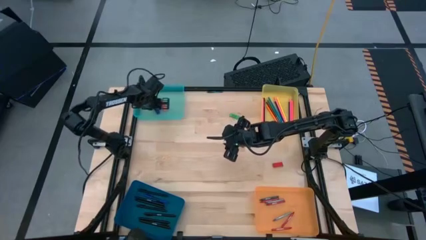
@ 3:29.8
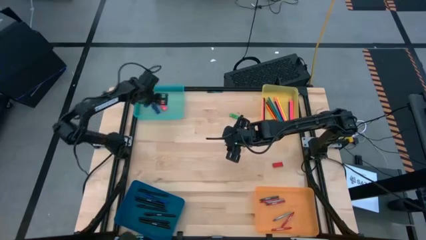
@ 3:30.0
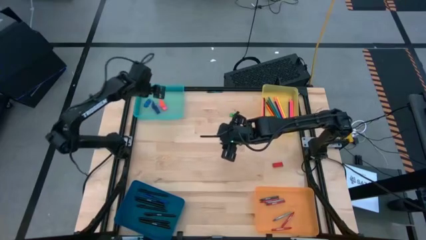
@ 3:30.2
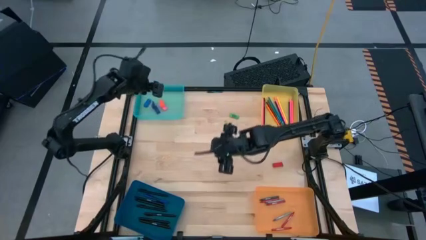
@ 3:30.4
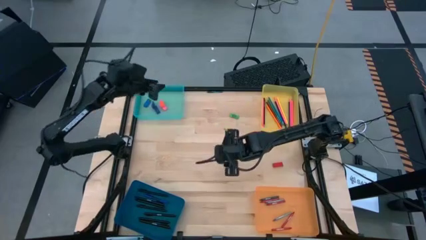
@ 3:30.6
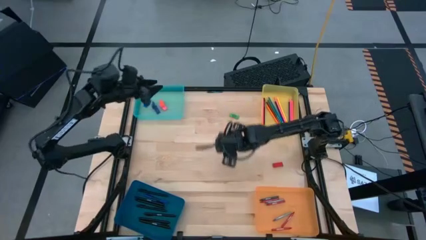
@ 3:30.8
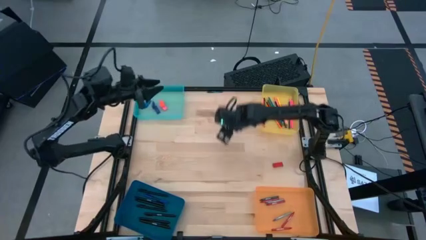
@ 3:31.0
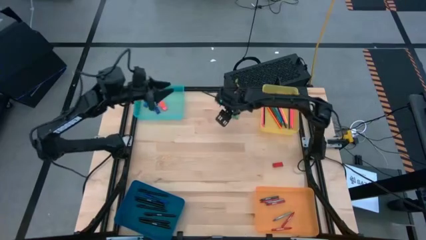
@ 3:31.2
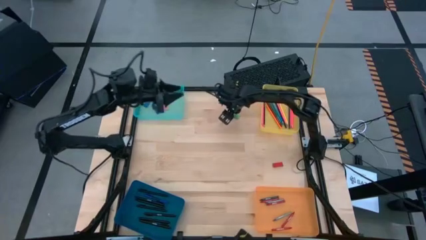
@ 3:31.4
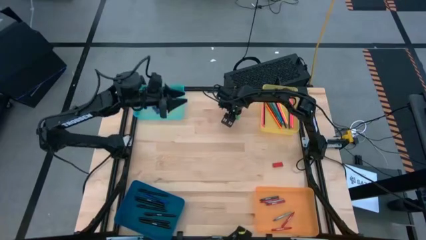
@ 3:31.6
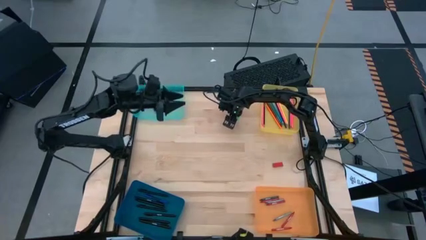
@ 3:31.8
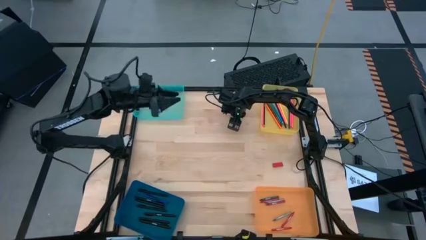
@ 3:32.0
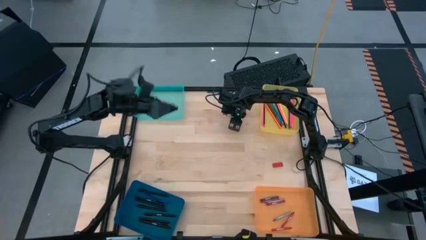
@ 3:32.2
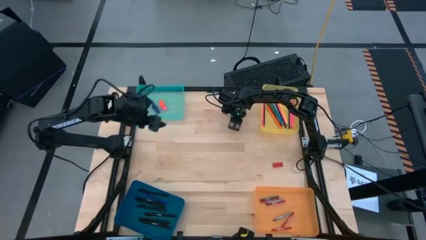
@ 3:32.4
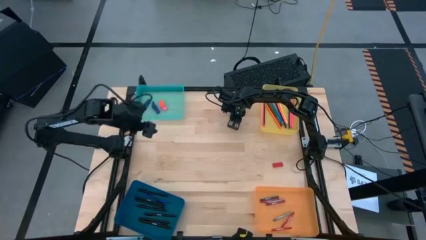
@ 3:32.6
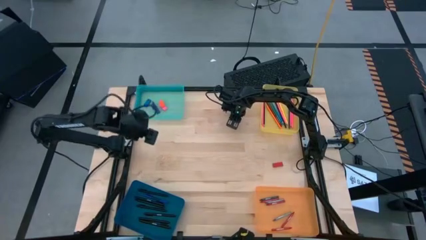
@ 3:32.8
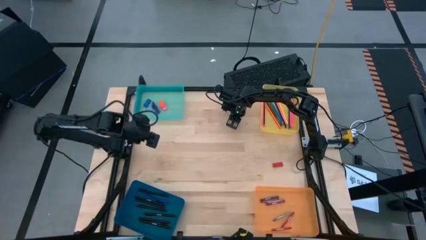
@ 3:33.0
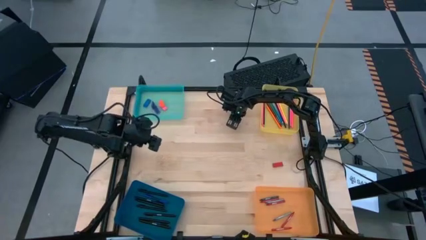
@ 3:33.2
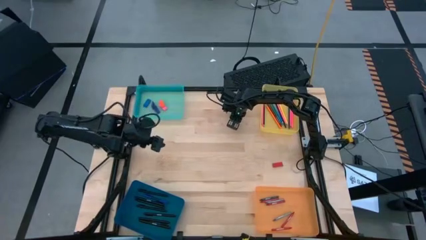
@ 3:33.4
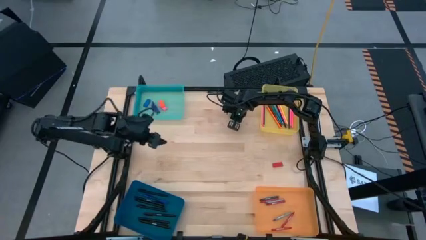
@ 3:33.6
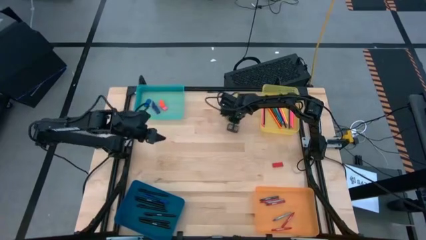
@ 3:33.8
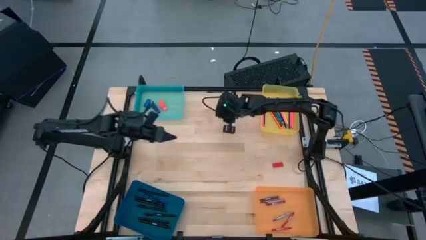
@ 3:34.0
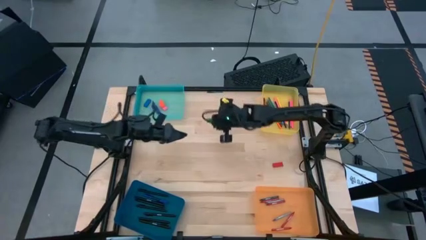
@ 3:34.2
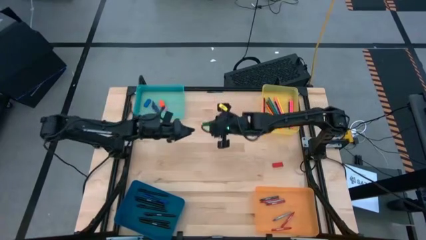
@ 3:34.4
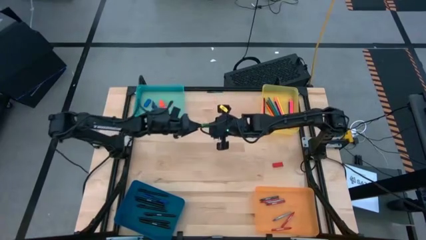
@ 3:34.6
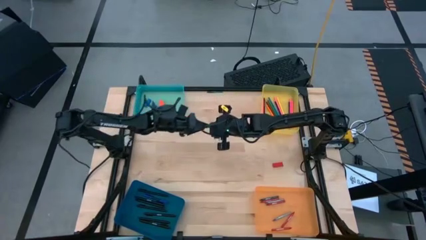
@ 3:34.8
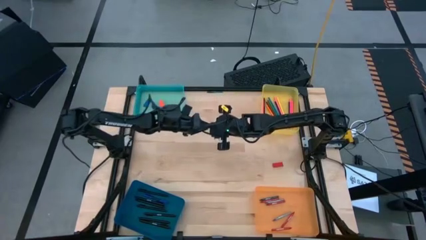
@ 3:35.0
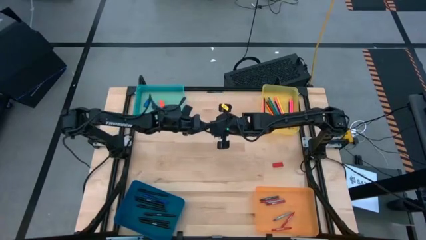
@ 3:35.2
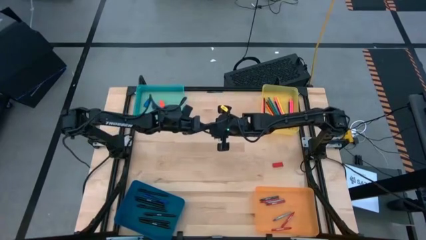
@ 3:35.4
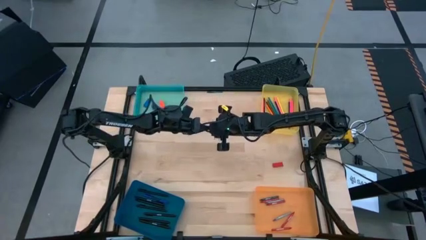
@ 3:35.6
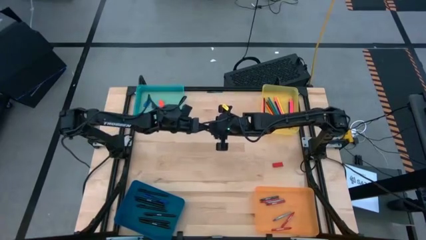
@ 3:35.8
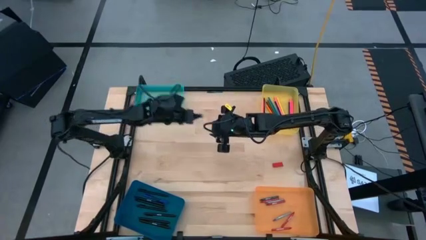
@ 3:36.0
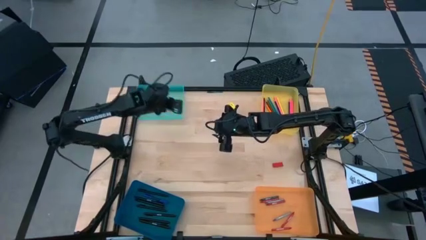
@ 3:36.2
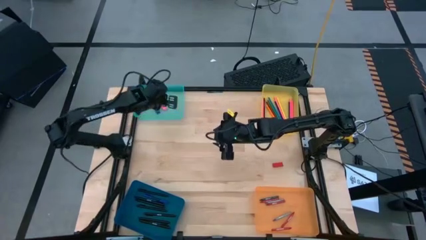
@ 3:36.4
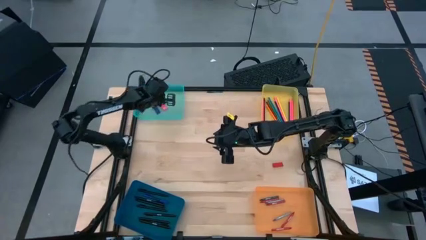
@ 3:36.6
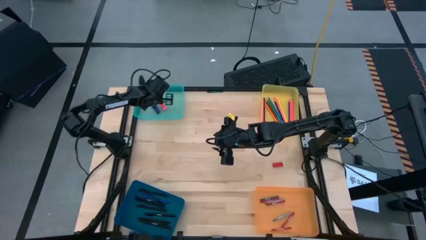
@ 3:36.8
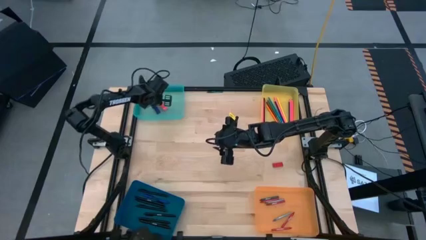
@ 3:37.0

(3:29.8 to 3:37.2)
Task: Sort crayons/erasers/pens/pencils in bins
Put the green eraser into the light blue bin

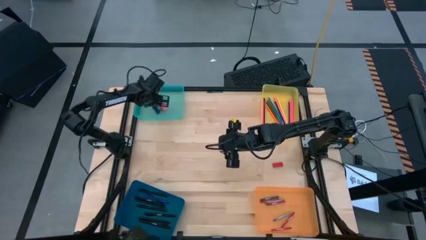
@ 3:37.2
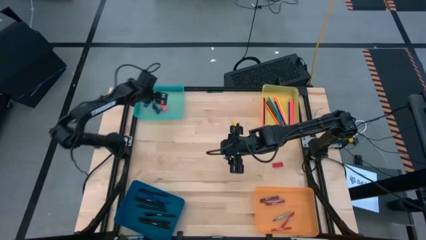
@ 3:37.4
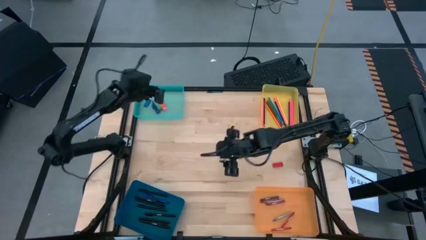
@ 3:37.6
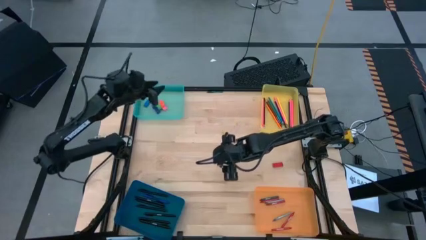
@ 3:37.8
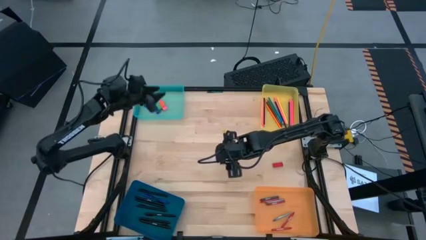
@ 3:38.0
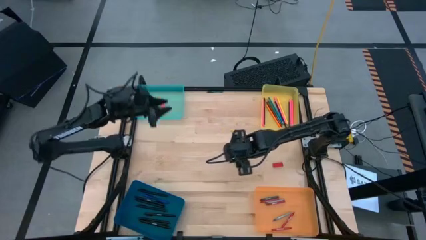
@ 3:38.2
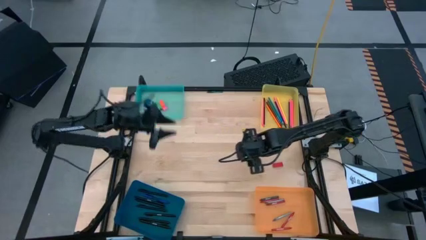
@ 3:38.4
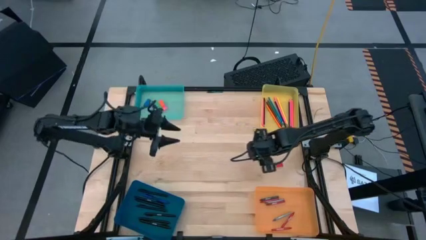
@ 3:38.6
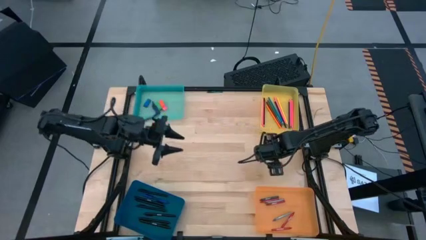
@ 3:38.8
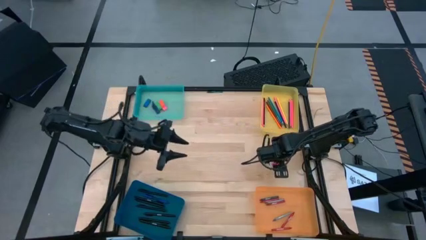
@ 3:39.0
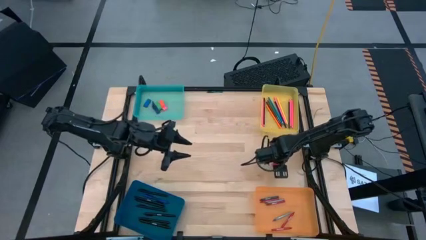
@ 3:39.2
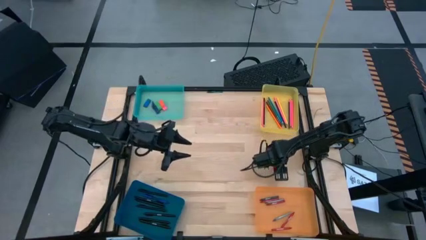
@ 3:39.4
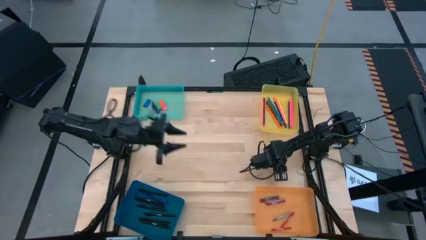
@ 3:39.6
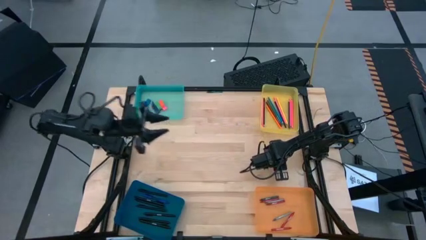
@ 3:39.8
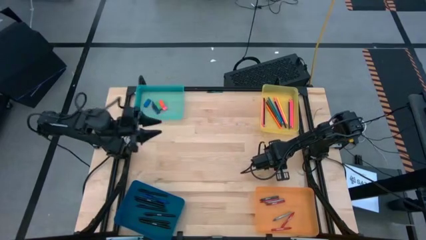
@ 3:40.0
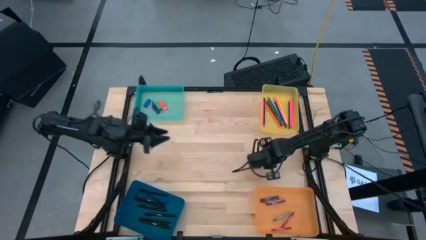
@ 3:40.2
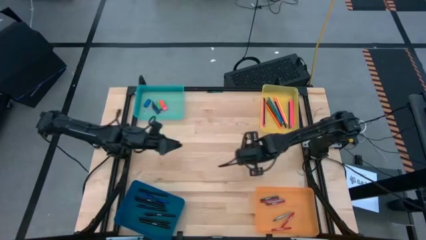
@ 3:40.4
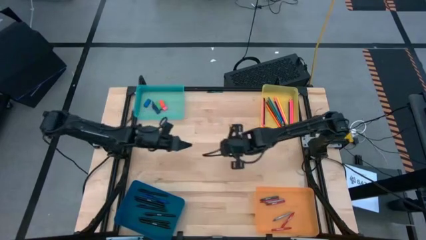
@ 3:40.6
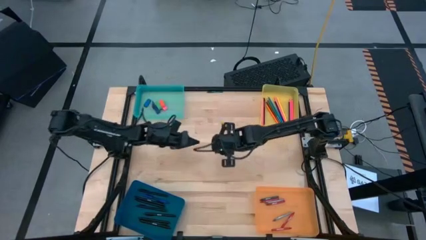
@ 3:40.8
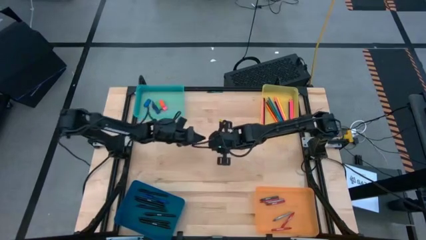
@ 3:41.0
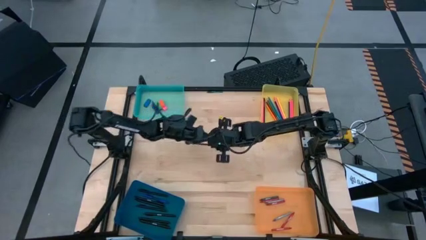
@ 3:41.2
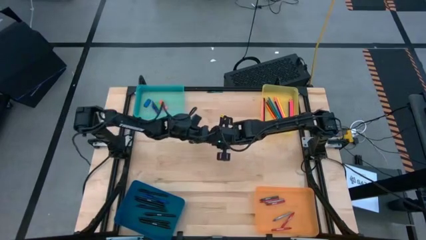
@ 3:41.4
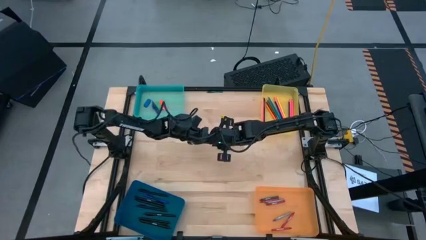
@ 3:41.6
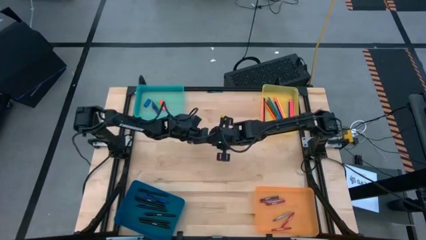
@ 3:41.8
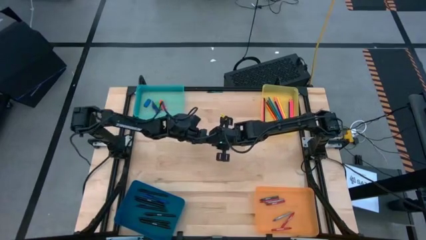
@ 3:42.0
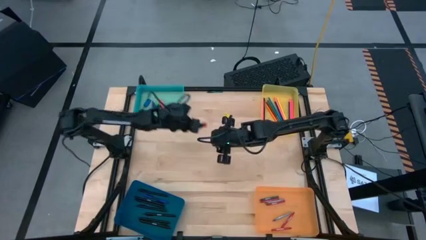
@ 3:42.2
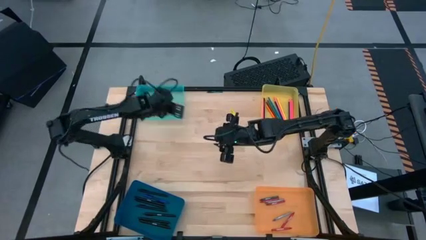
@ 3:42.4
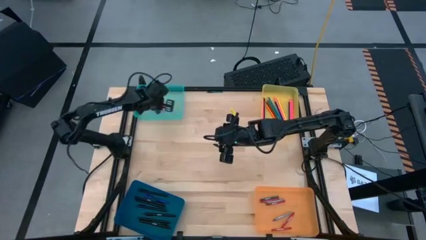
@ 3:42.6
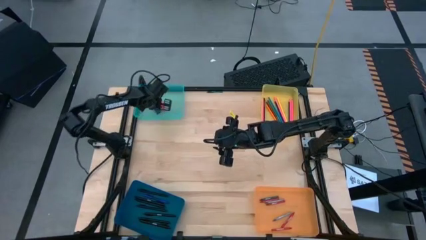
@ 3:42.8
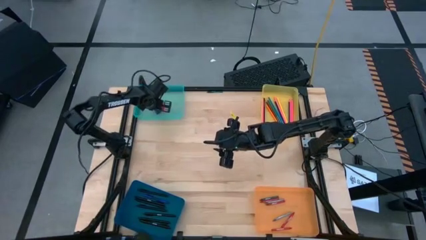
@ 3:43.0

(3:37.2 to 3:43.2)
Put the red eraser into the light blue bin

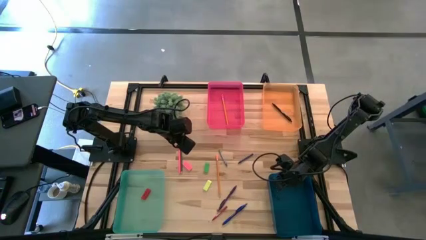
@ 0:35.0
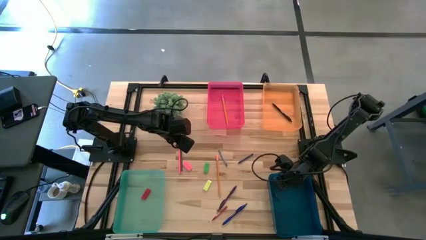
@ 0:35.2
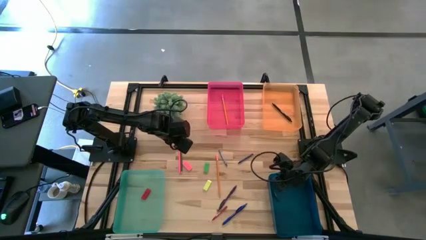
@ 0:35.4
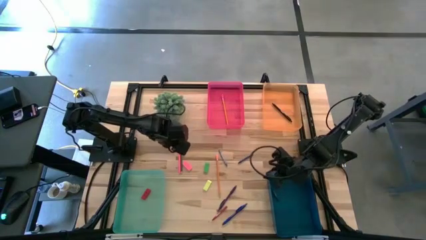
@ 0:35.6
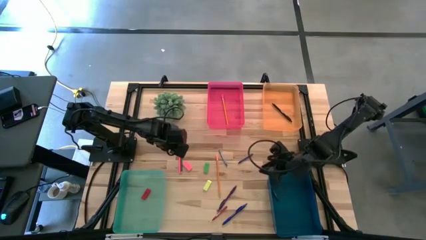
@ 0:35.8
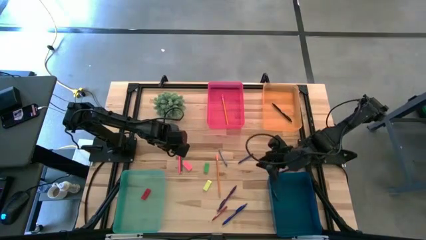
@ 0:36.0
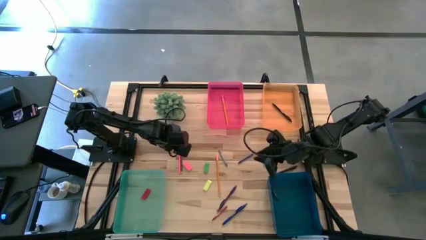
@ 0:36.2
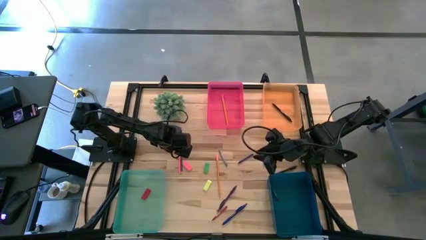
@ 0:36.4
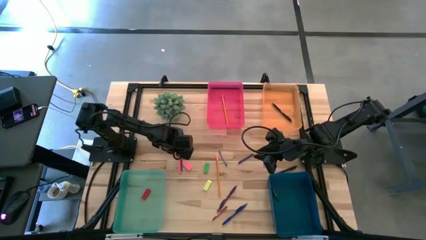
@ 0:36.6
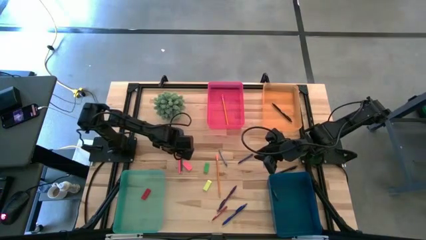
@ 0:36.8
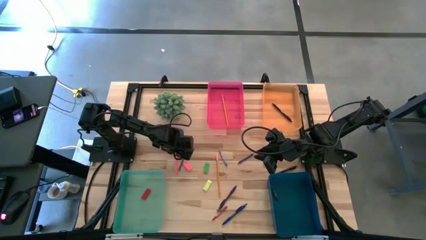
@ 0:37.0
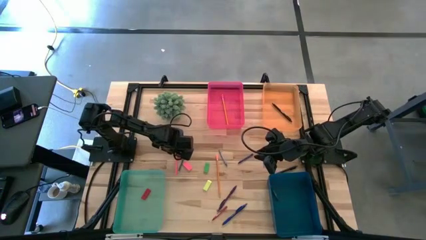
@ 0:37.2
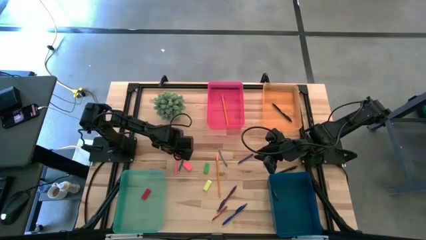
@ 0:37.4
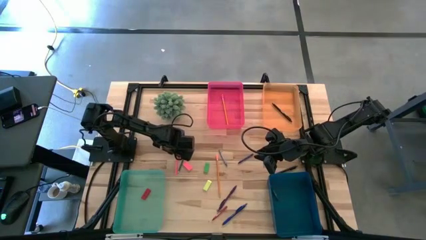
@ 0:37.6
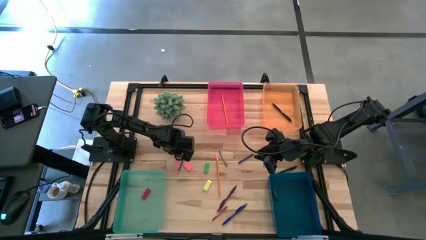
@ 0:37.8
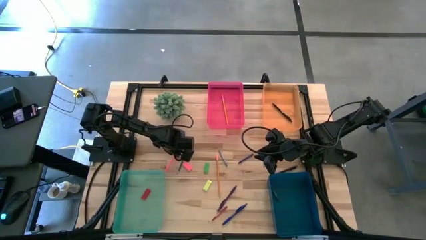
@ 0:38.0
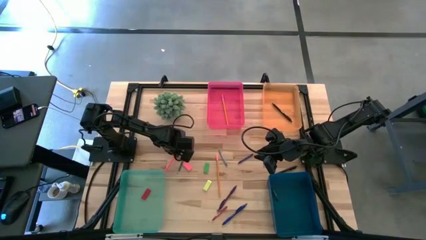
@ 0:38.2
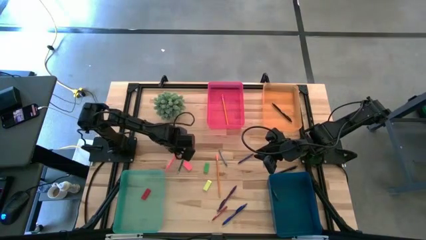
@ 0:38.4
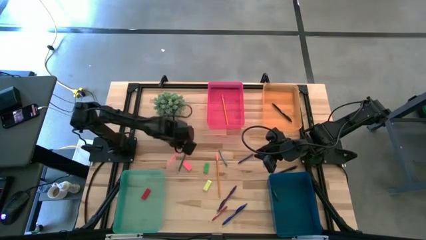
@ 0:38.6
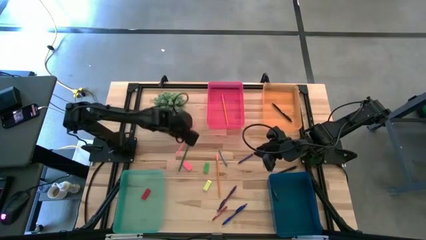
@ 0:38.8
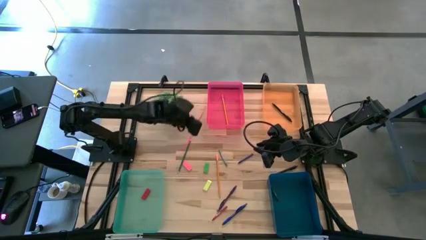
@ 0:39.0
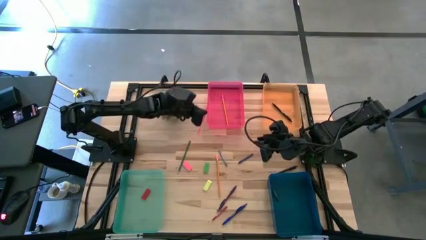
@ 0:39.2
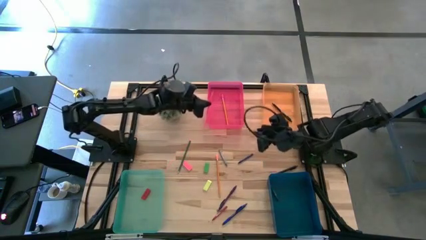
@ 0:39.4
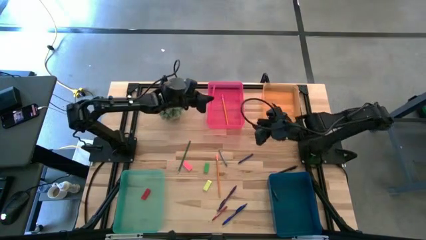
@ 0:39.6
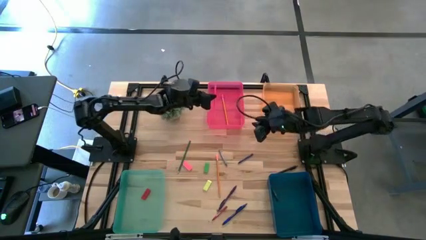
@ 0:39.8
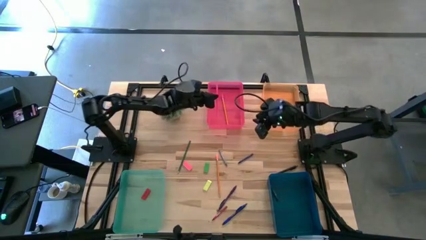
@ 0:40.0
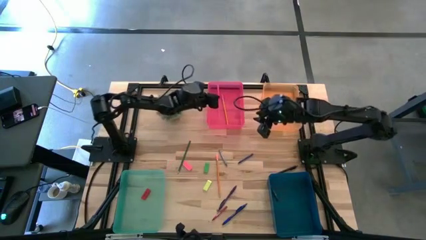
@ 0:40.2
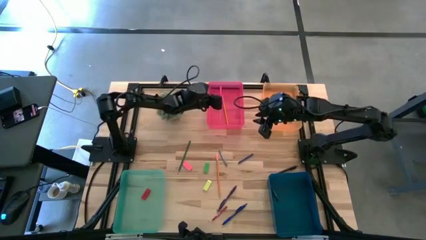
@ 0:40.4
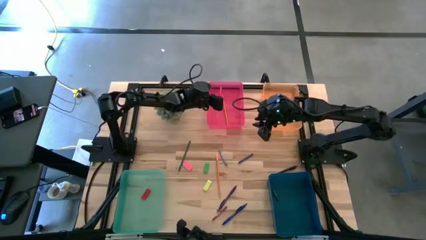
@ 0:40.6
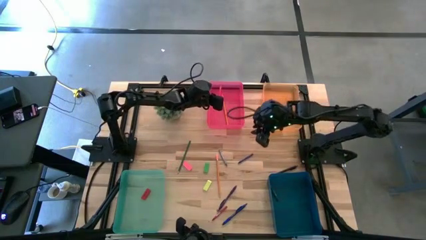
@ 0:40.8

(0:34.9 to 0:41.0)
Task: Sort crayons/erasers/pens/pencils in bins
Put the pink pencil into the pink bin
